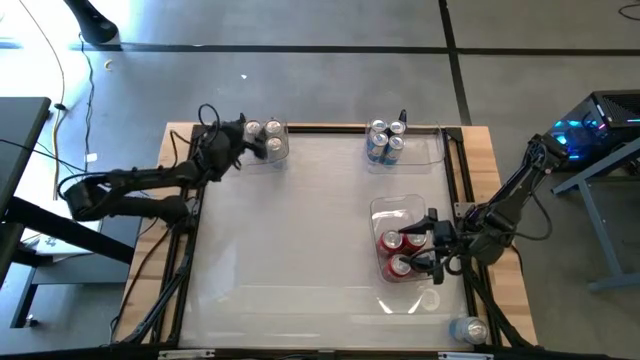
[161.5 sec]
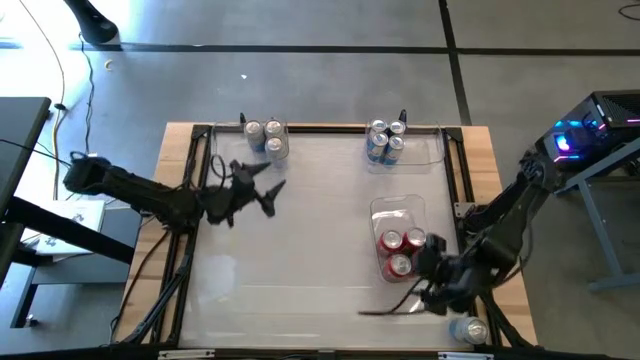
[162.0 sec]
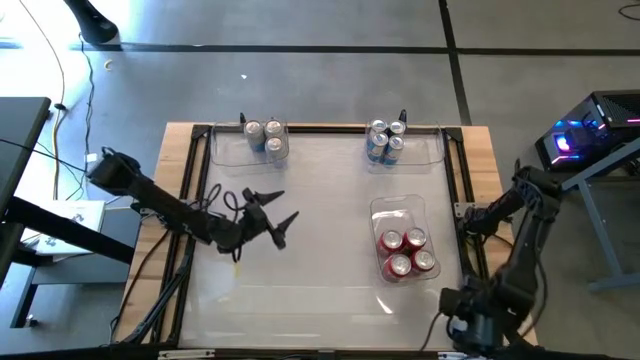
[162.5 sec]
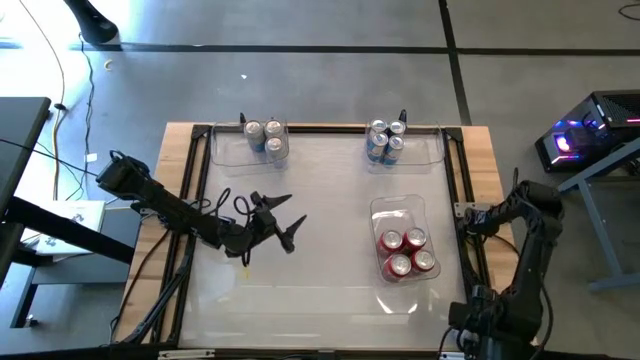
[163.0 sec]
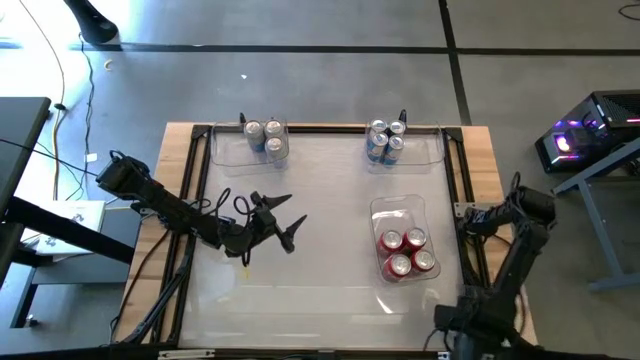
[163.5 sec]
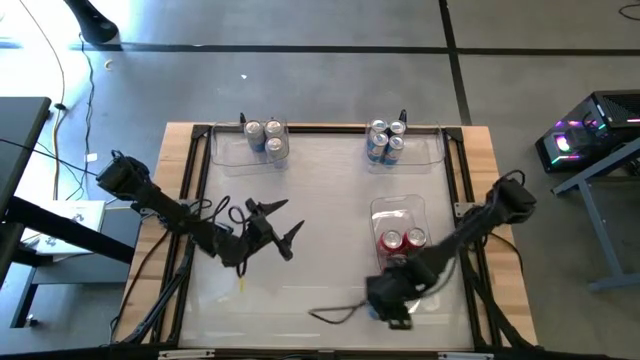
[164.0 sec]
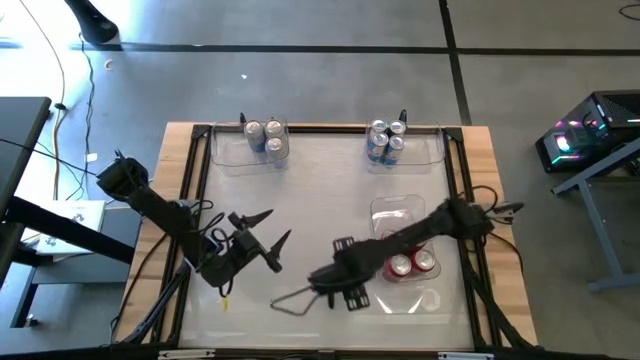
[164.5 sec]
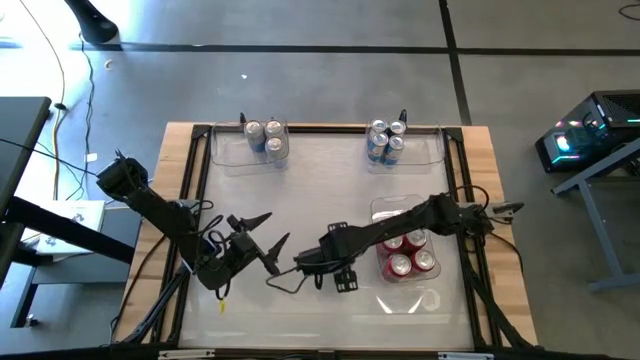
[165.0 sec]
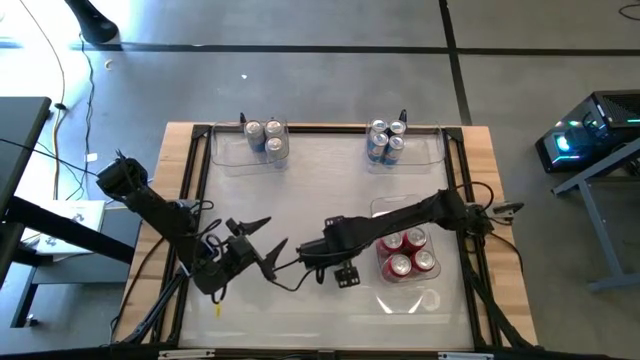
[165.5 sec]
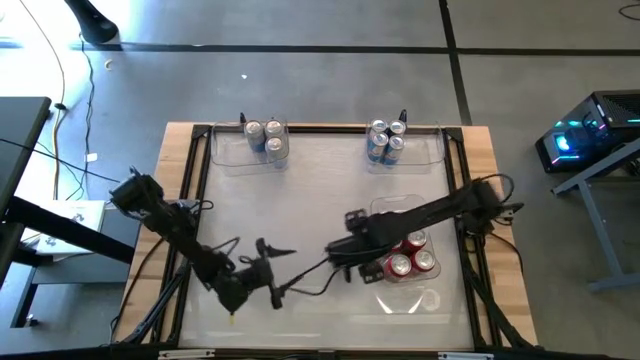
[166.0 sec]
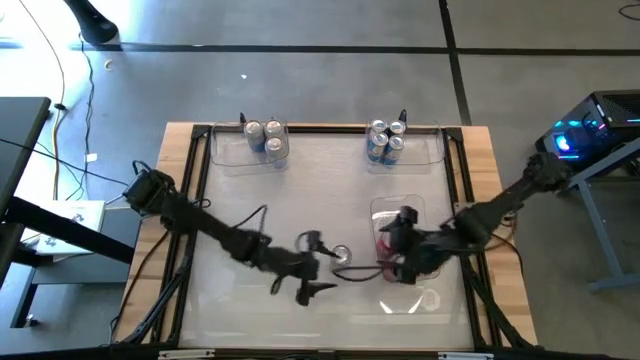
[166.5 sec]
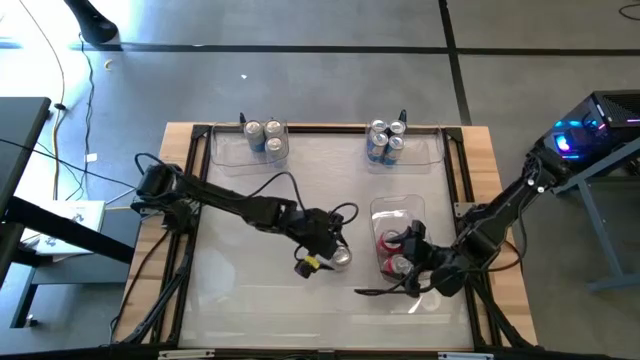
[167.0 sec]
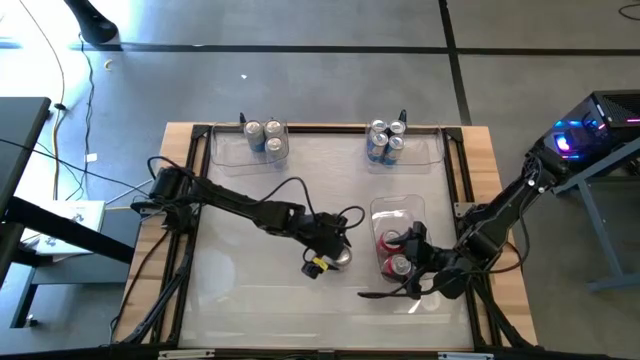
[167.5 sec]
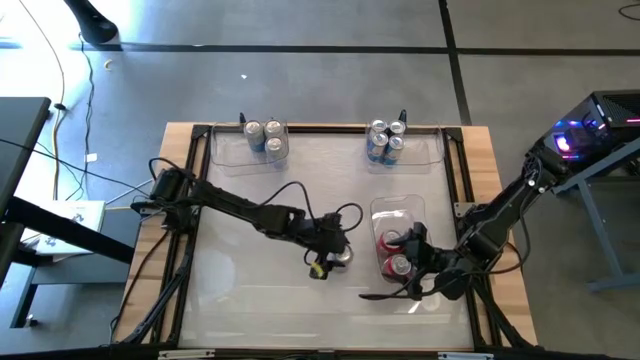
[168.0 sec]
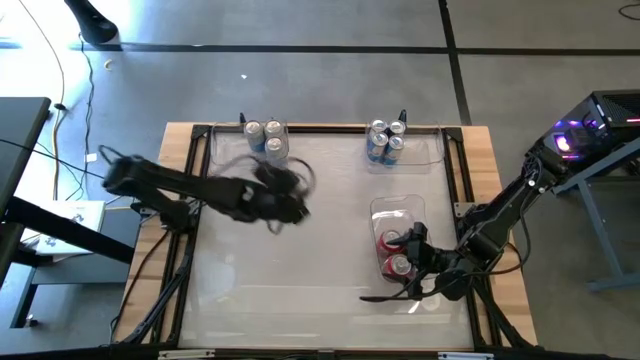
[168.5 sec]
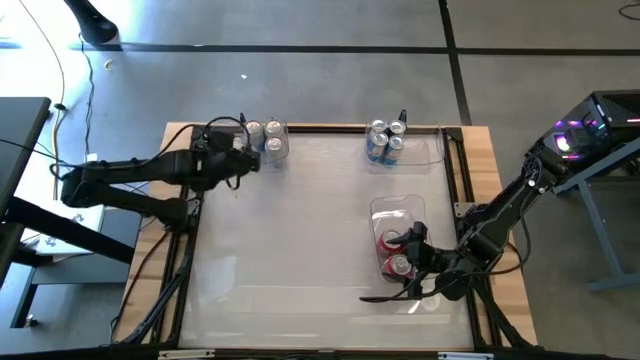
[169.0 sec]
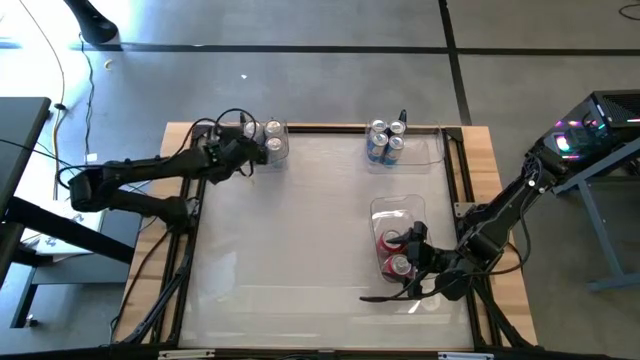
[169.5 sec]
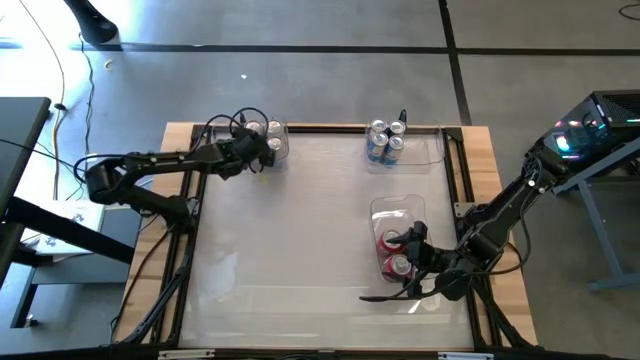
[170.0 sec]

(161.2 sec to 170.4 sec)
Task: Sort soda cans
Put the white soda can into the top left transparent bin

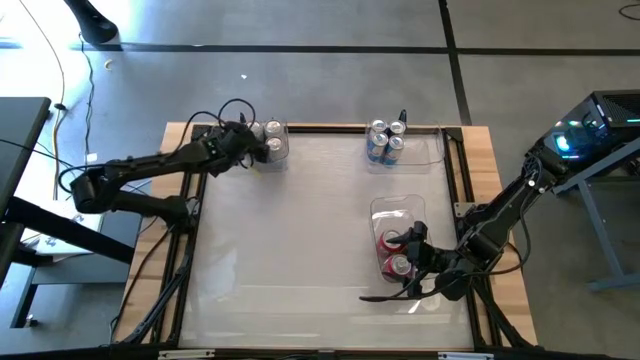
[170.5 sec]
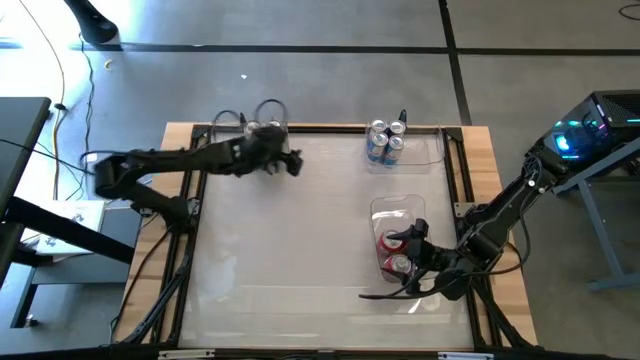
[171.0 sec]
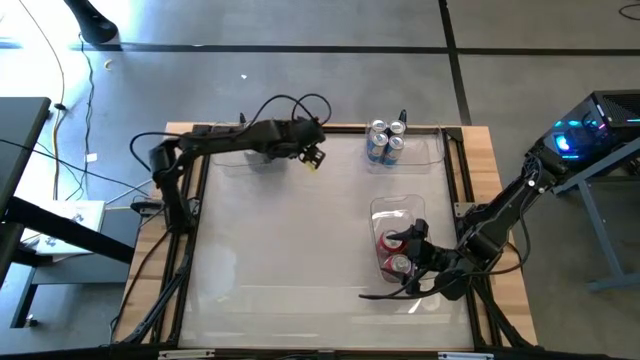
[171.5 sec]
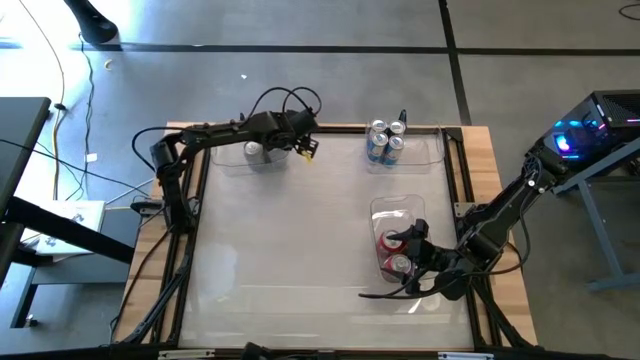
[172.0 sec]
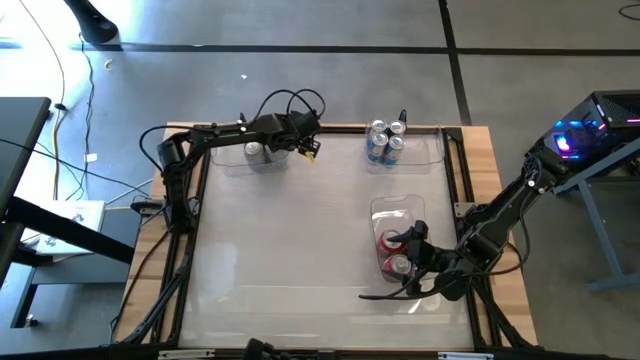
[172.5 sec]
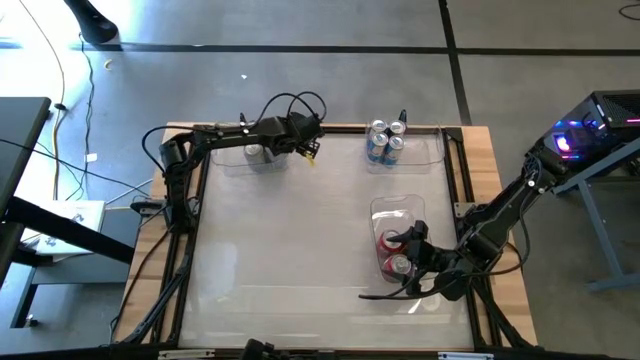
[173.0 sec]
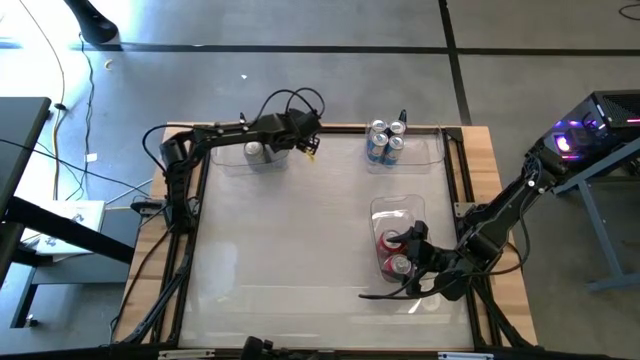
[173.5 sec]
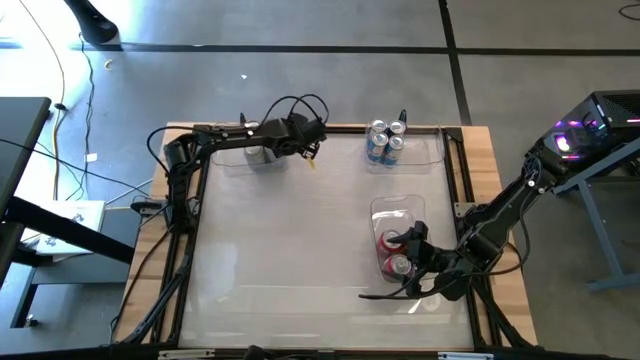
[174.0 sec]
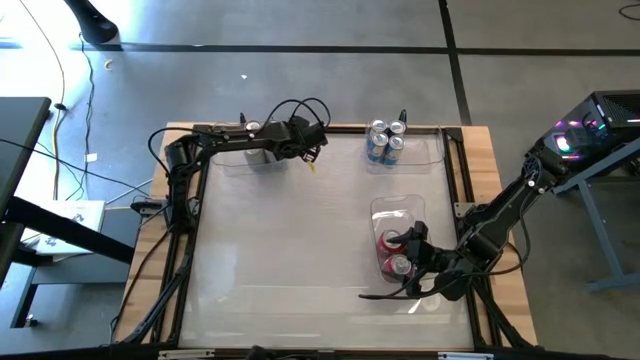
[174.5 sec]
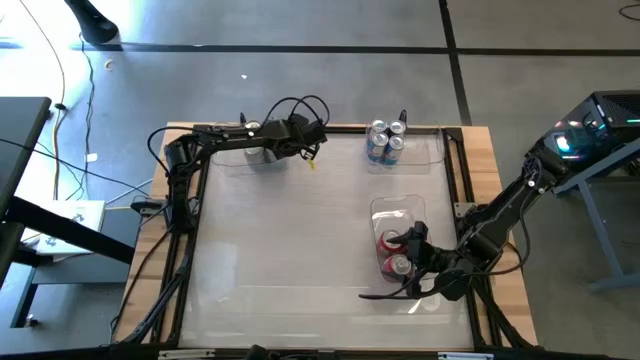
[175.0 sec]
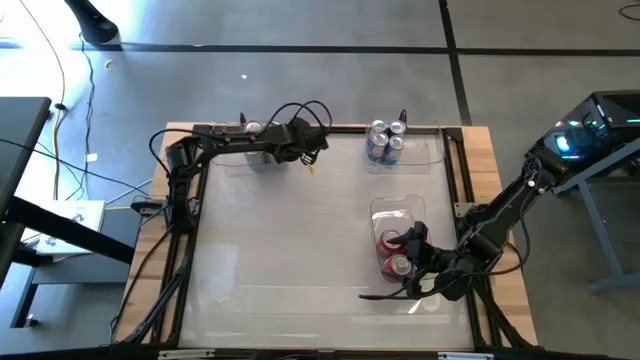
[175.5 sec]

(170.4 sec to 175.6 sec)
Move the top left transparent bin to the top center of the table

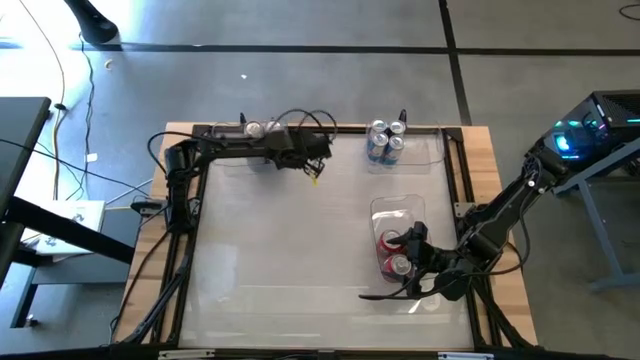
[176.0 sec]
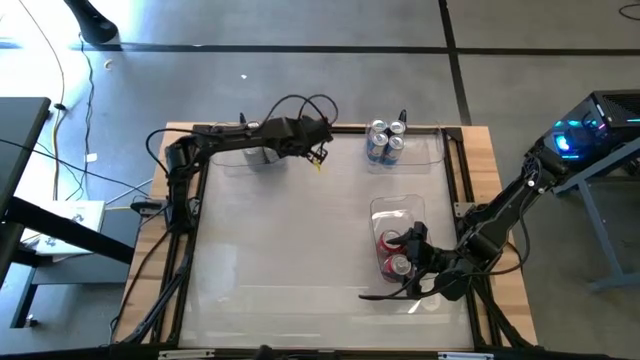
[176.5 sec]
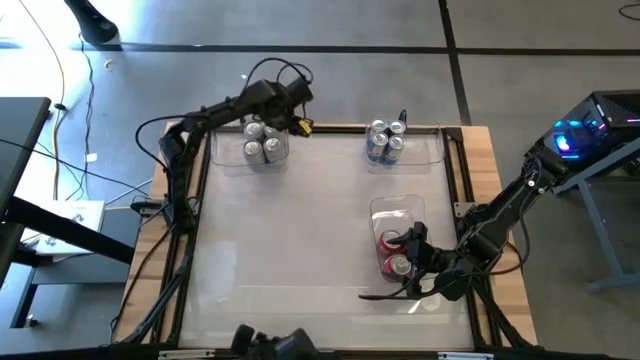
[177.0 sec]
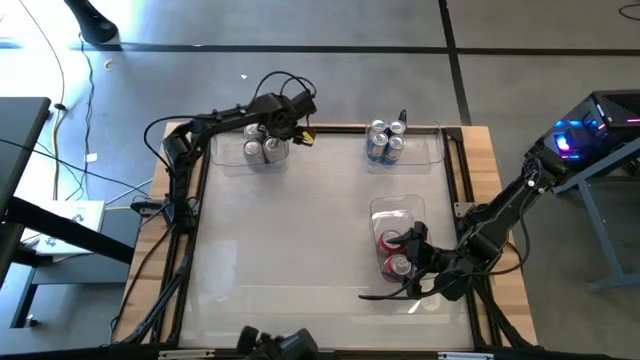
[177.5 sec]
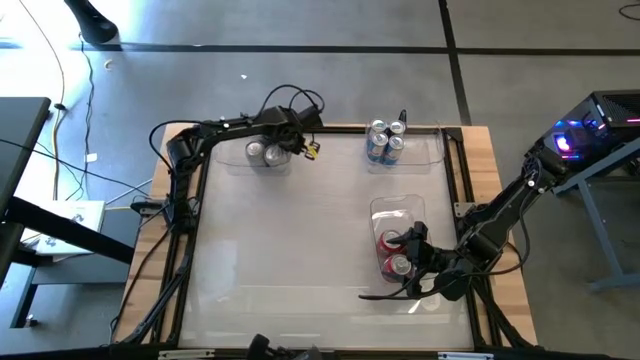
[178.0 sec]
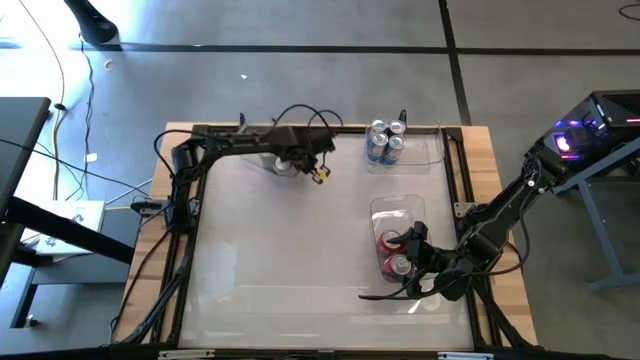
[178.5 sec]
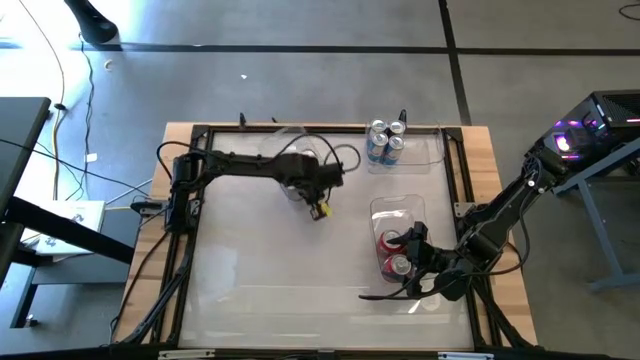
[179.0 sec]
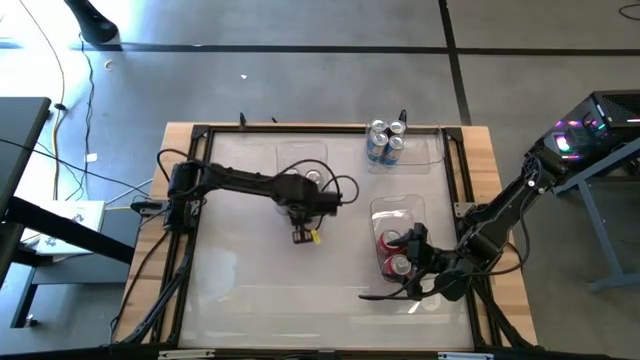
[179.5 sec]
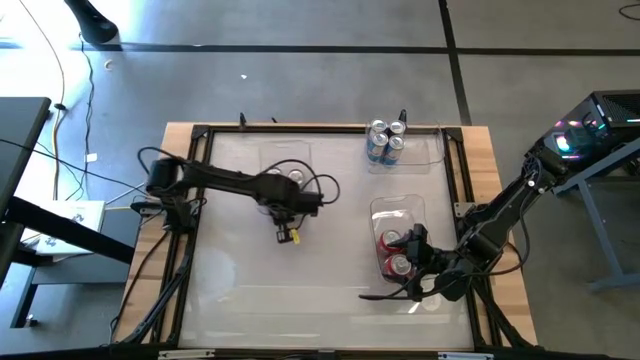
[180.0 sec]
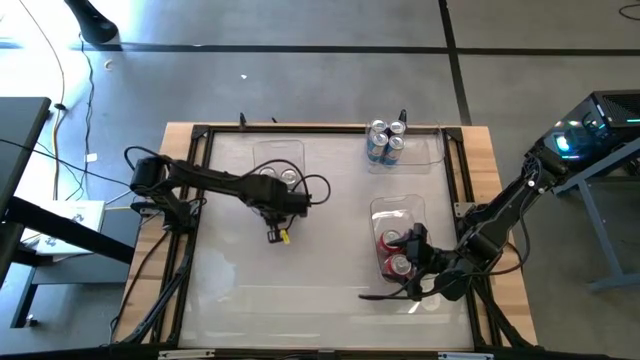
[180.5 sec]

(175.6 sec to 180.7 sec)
Move the top left transparent bin to the top center of the table

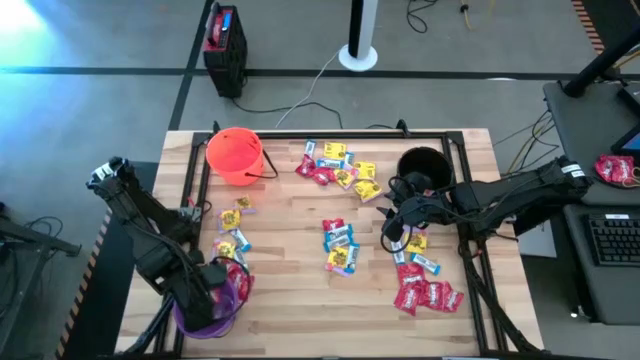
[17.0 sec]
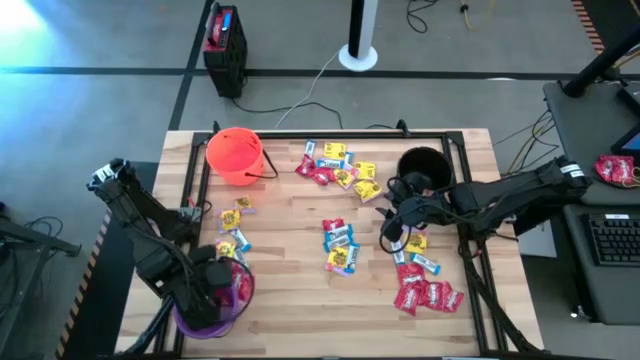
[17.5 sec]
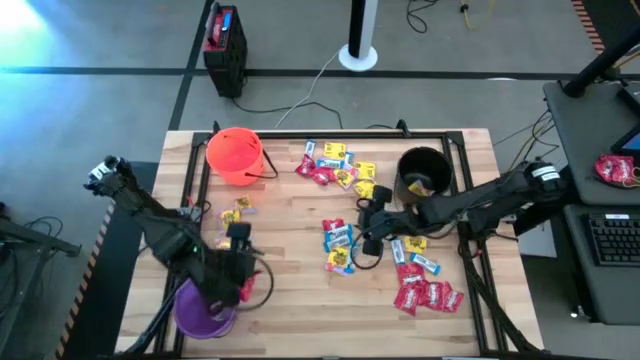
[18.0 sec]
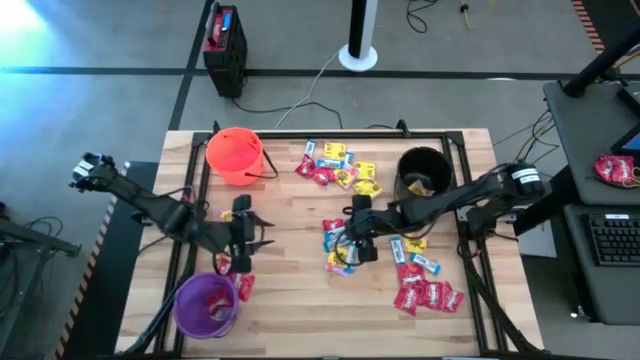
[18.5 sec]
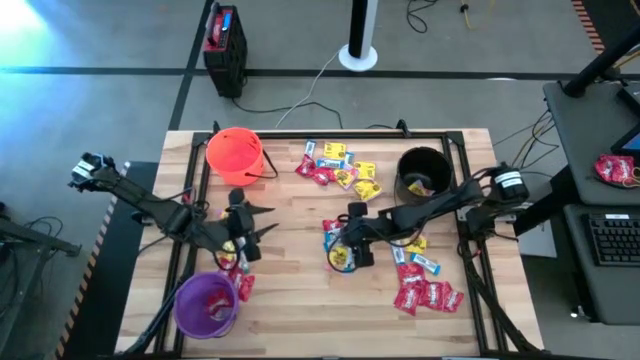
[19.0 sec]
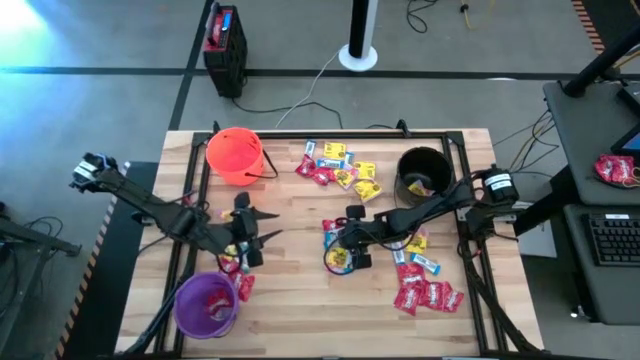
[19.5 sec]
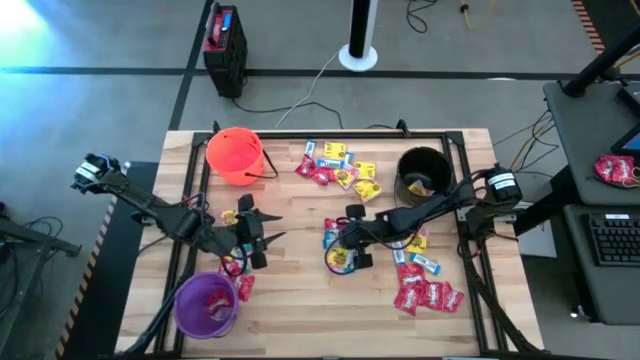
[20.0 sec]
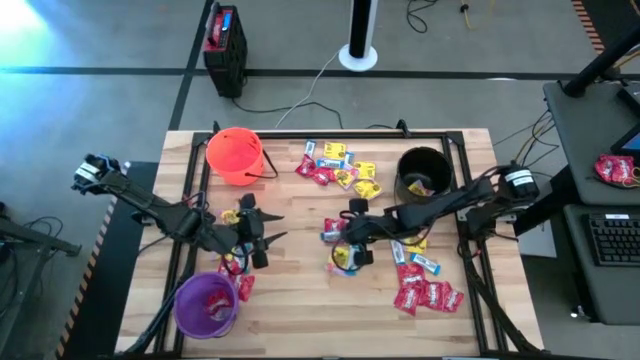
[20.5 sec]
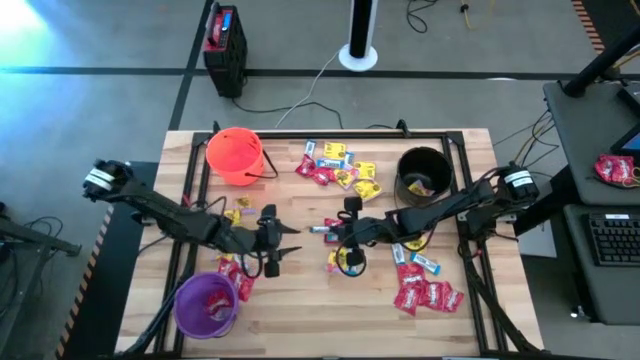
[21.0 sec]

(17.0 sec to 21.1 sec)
Task: Sort candy by brand, put in halloween buckets
Put the white chocolate bar into the orange bucket
